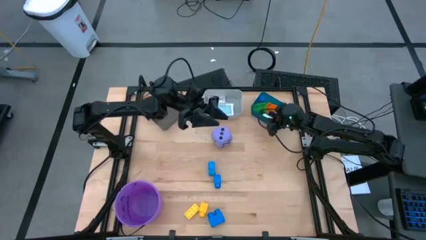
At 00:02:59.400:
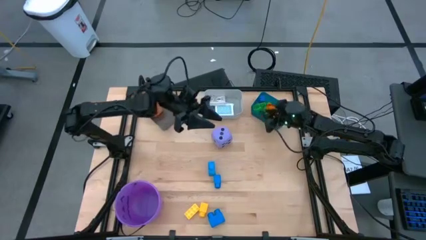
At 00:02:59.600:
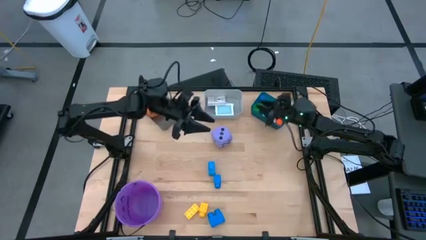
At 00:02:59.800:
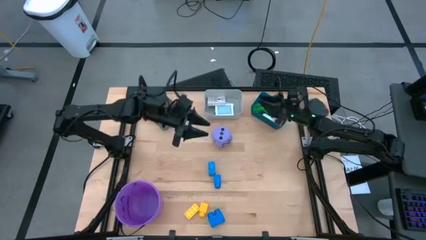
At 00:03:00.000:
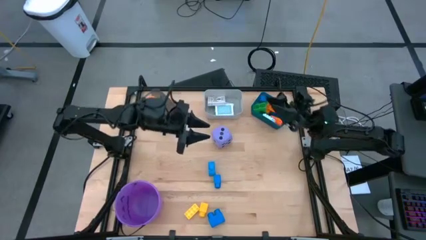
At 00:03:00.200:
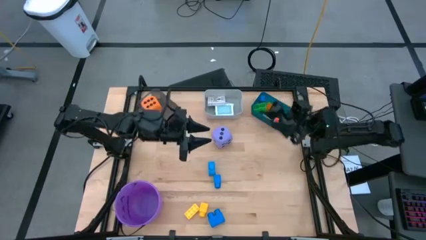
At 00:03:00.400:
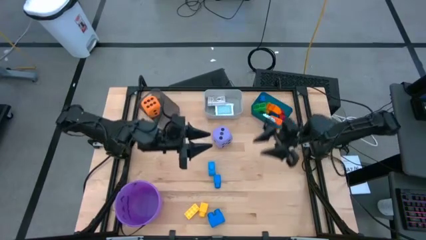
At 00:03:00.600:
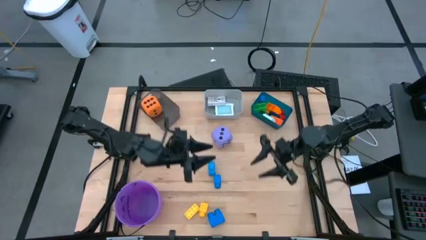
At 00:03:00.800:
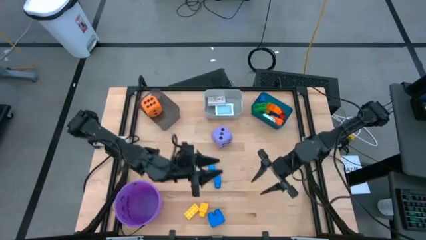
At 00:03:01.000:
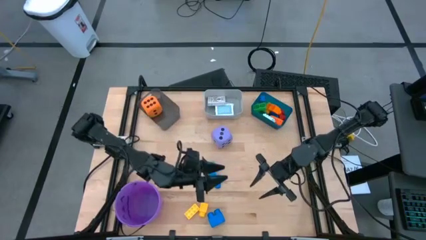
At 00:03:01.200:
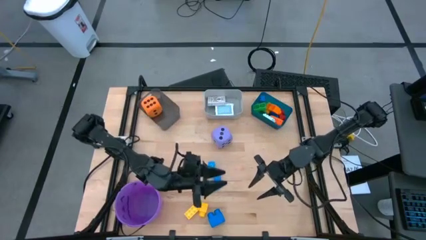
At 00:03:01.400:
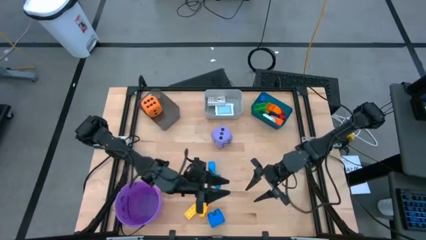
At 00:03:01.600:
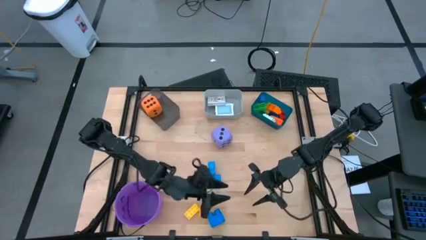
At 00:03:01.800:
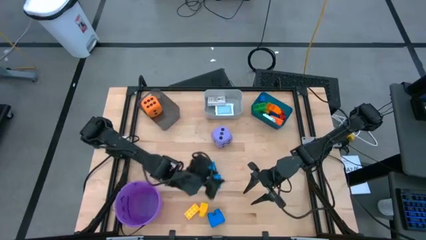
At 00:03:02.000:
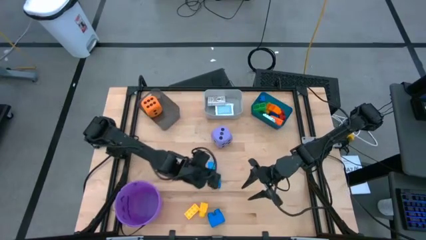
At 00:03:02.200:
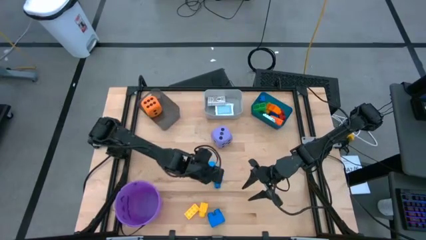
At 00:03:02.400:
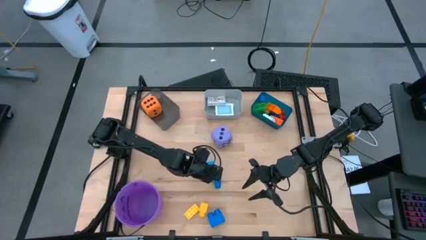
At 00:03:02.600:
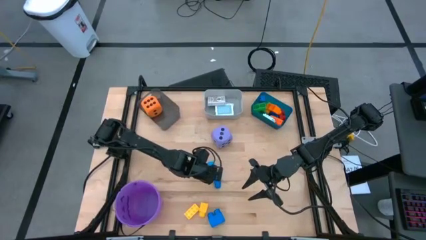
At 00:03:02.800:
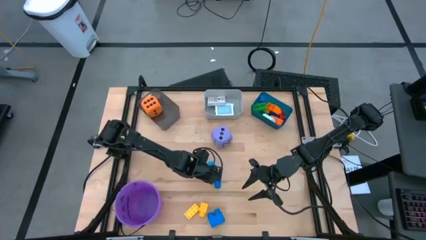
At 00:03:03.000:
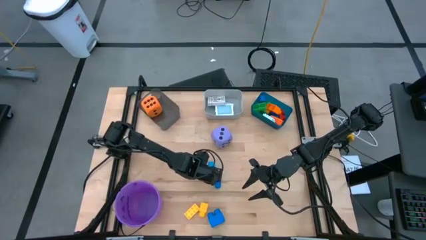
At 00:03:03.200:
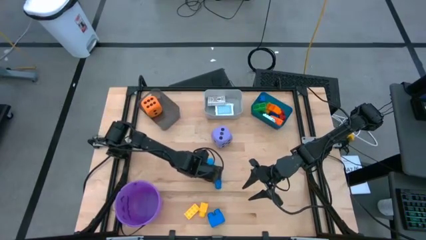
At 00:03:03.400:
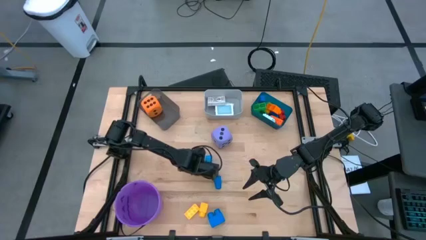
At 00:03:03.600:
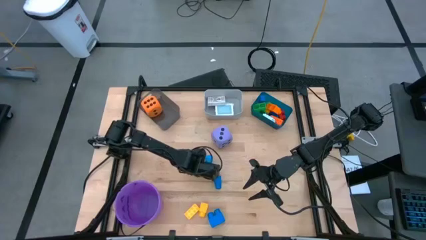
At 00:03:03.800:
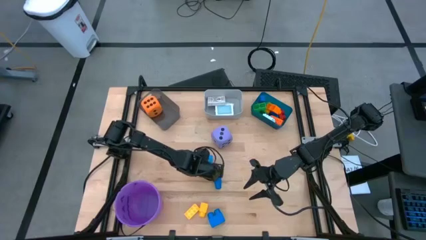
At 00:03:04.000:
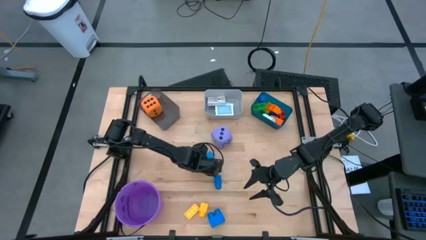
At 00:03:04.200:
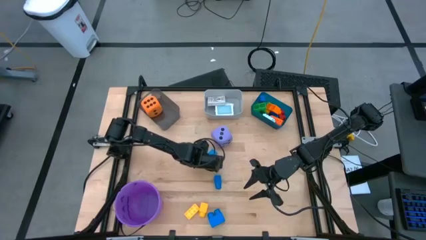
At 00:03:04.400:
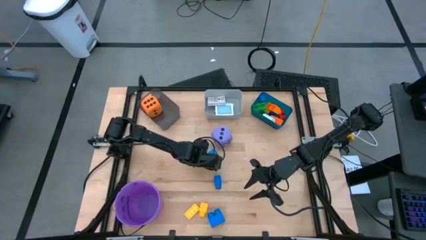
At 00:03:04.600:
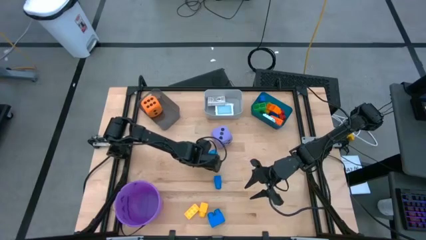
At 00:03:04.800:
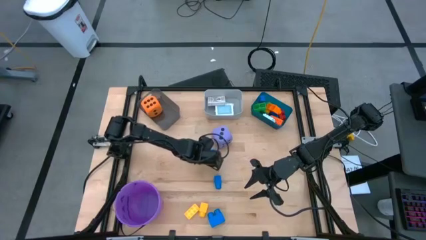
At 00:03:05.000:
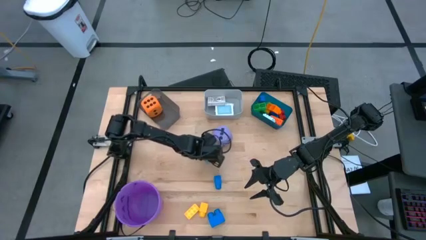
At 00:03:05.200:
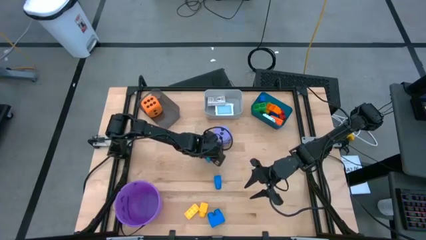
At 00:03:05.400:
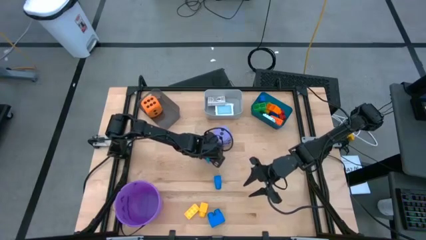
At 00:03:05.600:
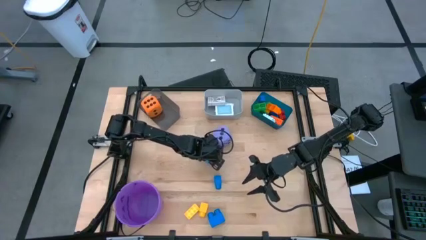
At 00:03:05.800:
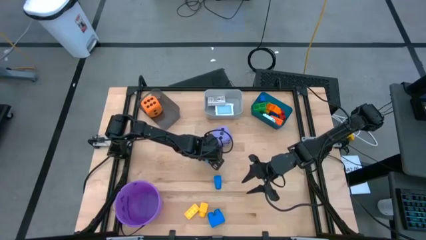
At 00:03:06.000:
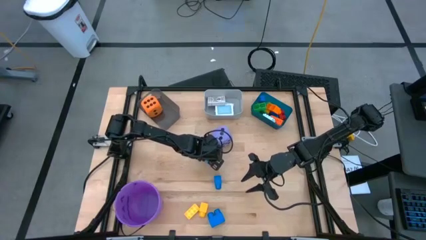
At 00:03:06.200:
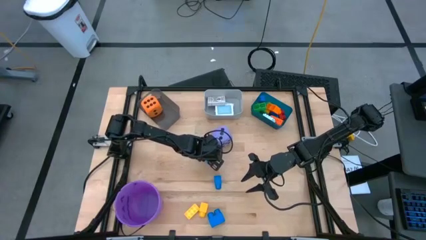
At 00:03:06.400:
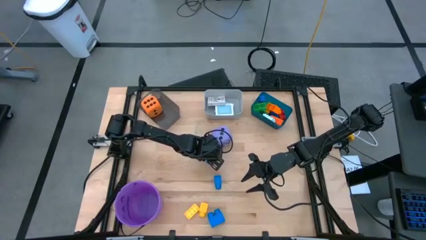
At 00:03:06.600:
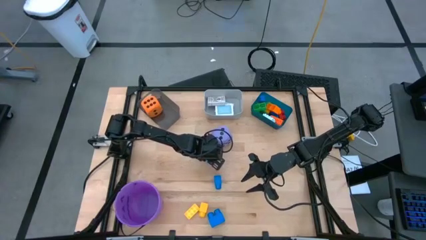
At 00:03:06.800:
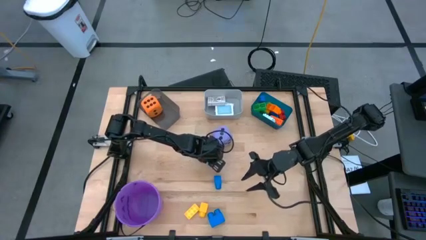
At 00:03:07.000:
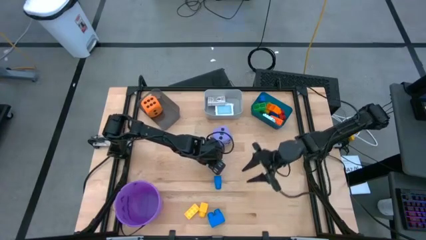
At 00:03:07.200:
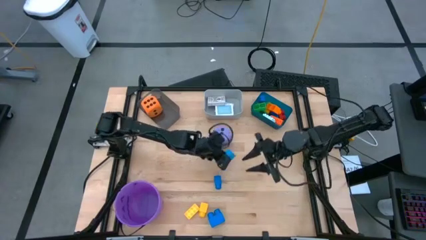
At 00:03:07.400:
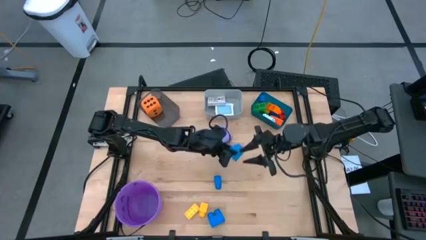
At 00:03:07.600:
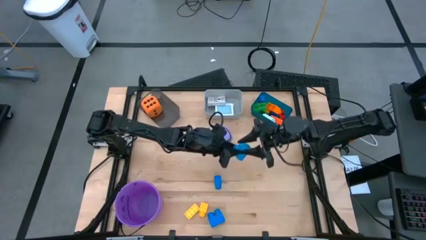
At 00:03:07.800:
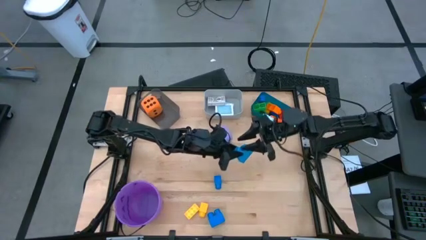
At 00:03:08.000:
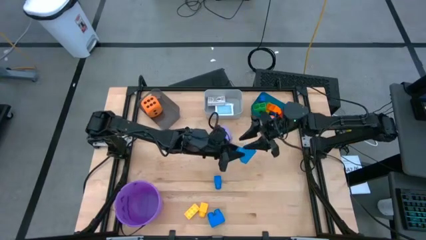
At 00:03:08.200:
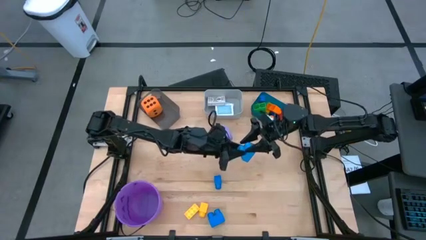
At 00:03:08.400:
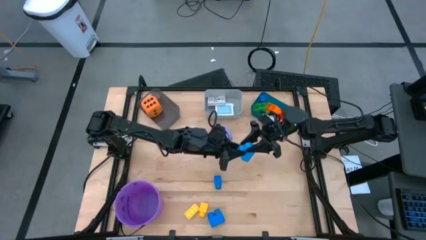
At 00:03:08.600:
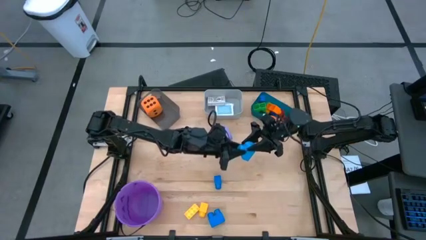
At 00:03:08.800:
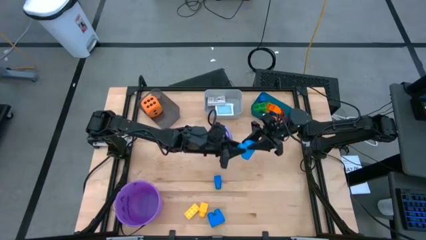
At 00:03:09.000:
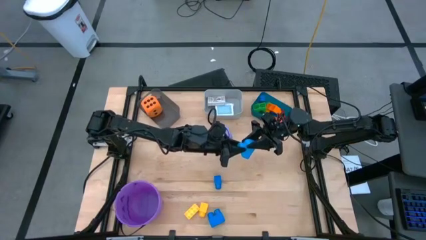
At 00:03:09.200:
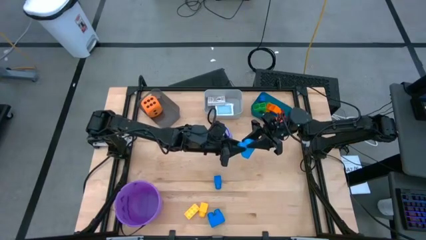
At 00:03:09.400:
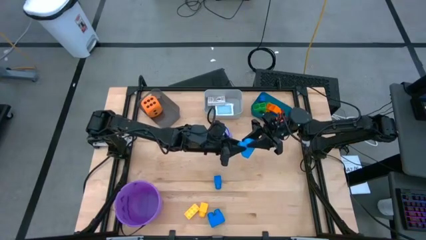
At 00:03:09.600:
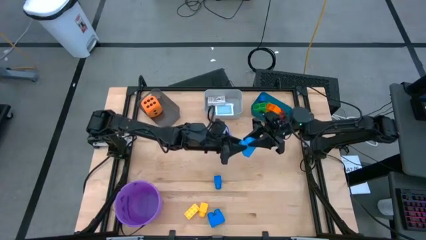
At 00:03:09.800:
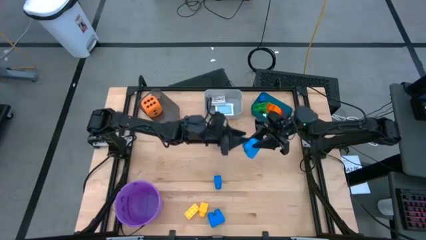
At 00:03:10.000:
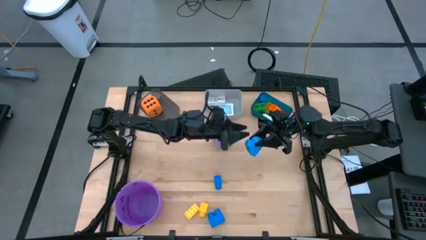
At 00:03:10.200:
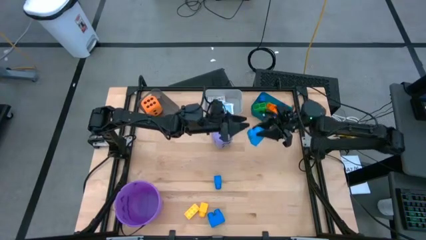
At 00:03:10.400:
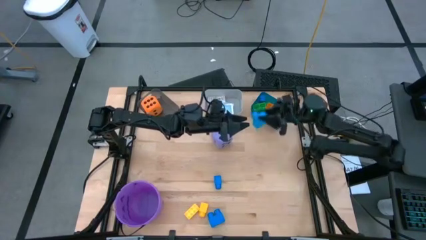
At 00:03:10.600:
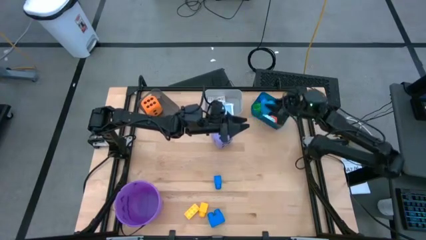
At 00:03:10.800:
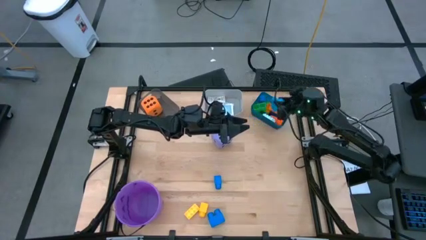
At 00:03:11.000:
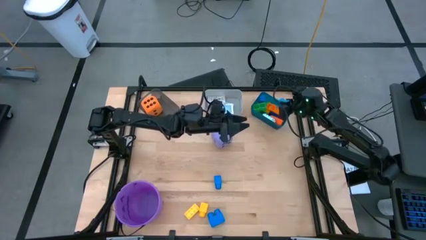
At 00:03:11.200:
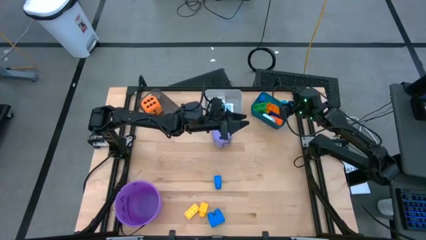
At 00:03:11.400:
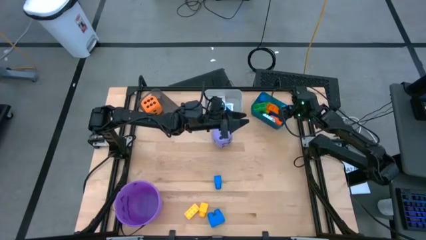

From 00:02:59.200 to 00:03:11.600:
Task: Pick & Place Toys
Put the blue game piece into the blue bin
